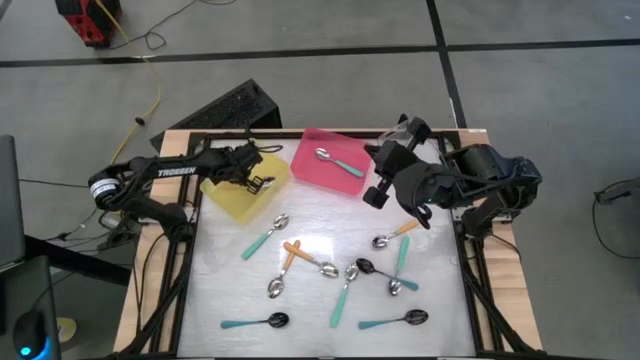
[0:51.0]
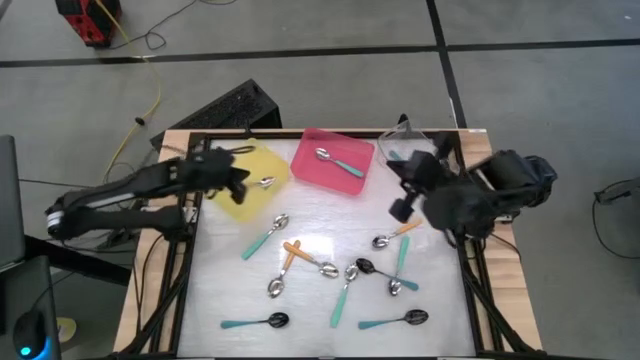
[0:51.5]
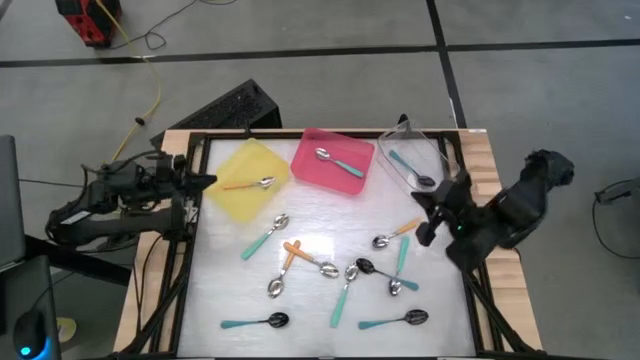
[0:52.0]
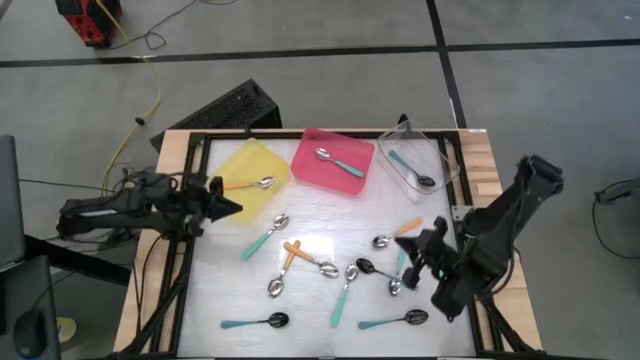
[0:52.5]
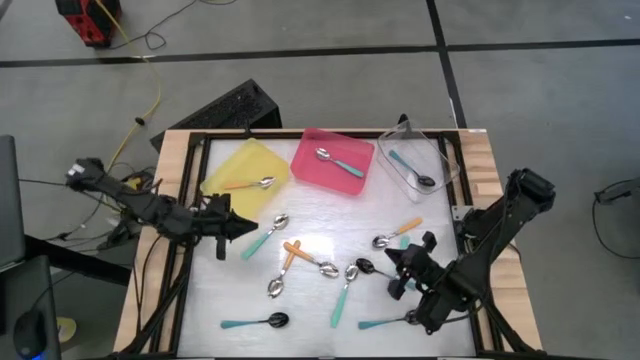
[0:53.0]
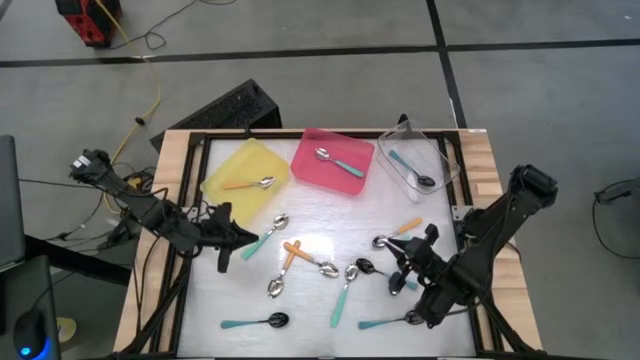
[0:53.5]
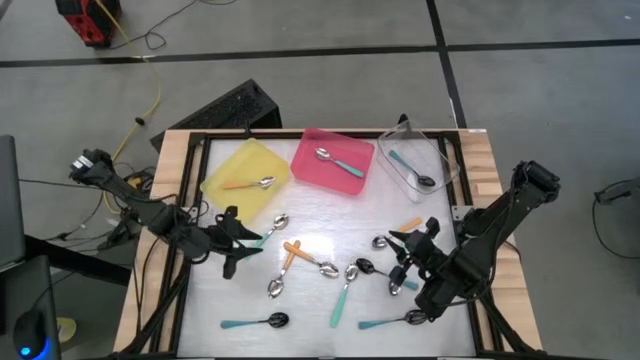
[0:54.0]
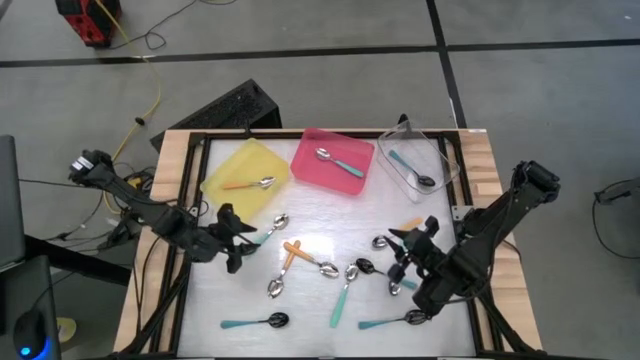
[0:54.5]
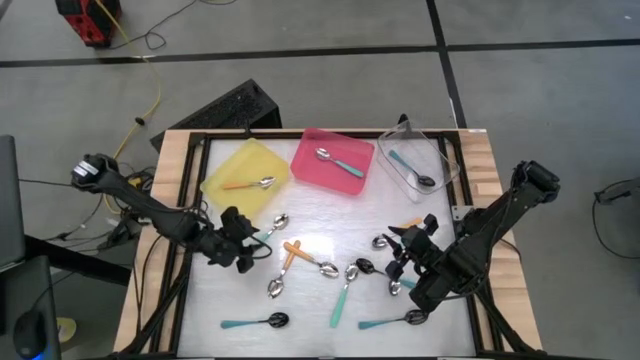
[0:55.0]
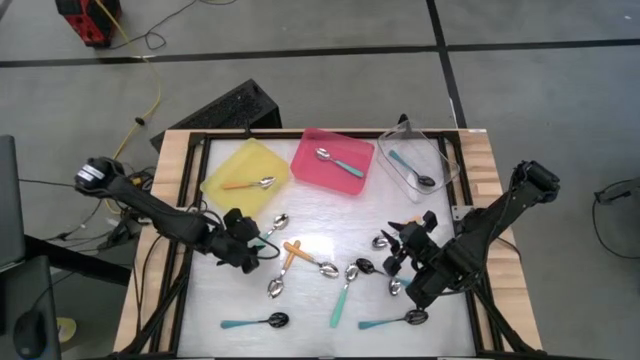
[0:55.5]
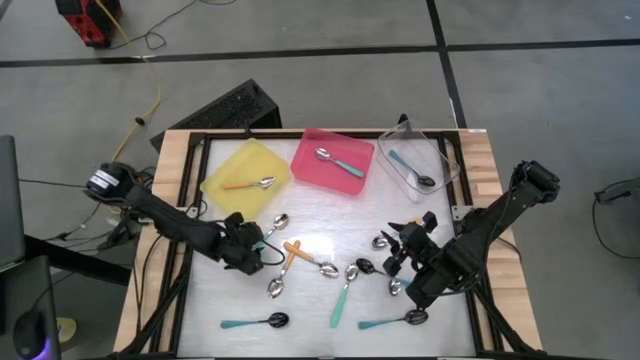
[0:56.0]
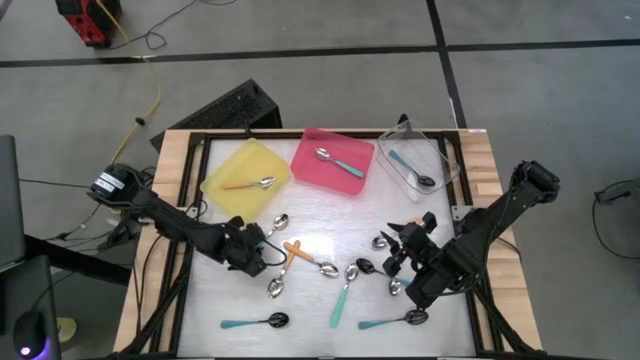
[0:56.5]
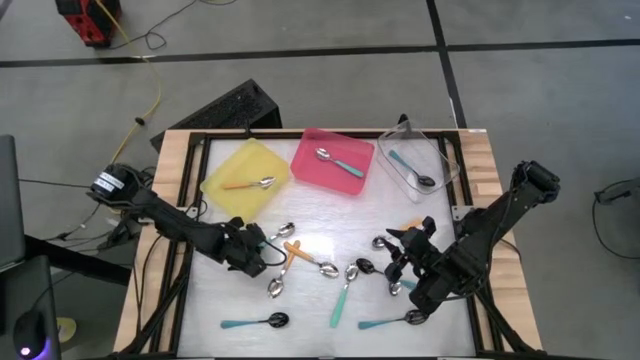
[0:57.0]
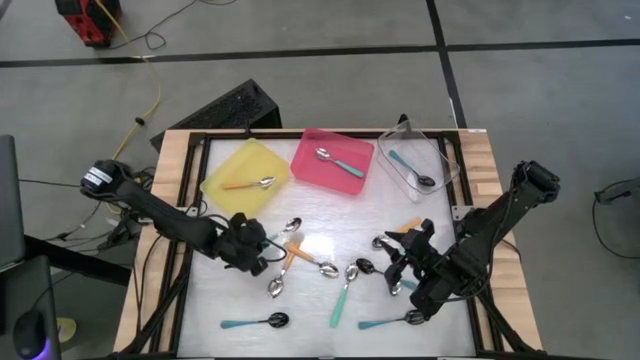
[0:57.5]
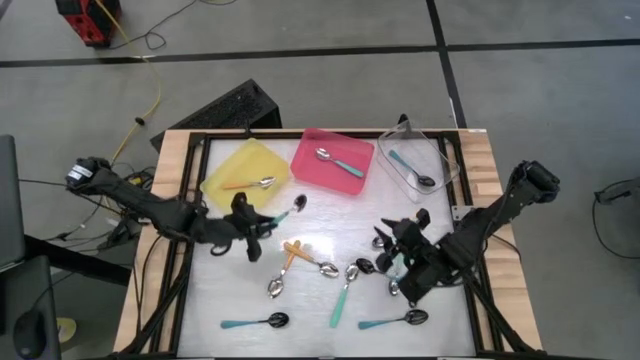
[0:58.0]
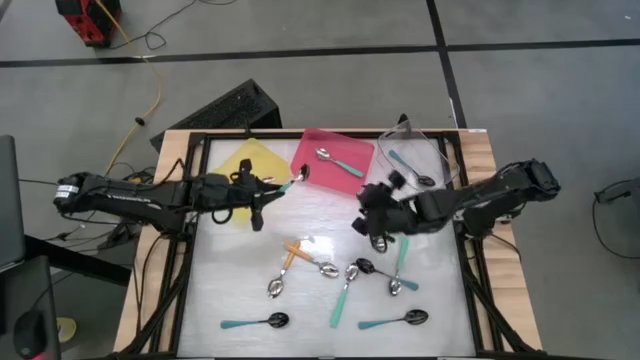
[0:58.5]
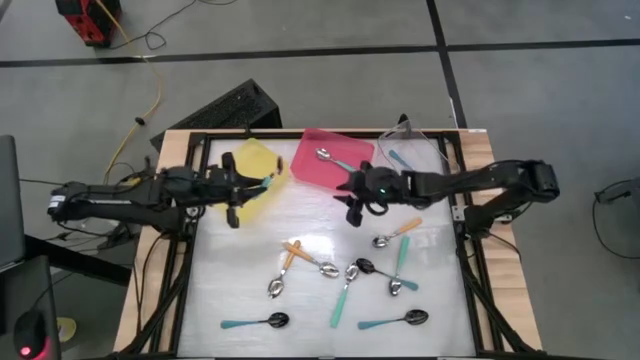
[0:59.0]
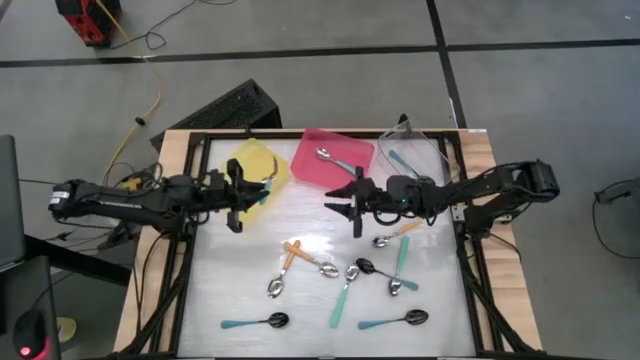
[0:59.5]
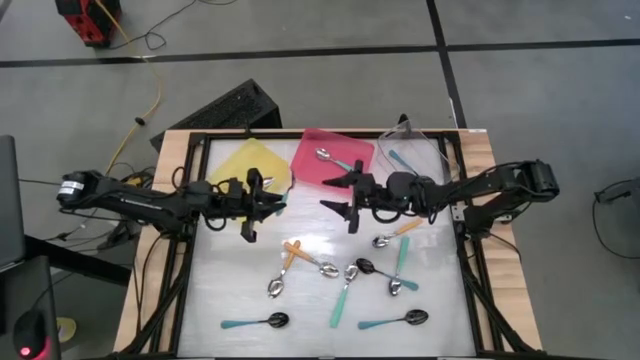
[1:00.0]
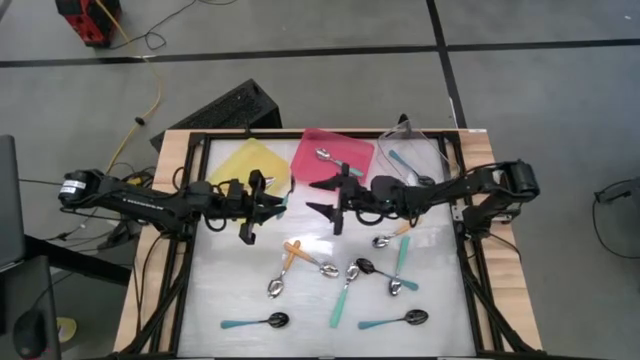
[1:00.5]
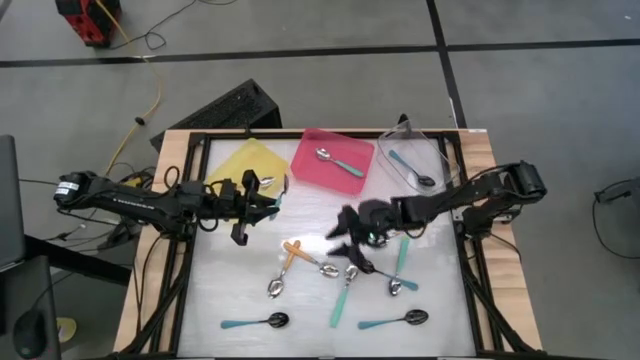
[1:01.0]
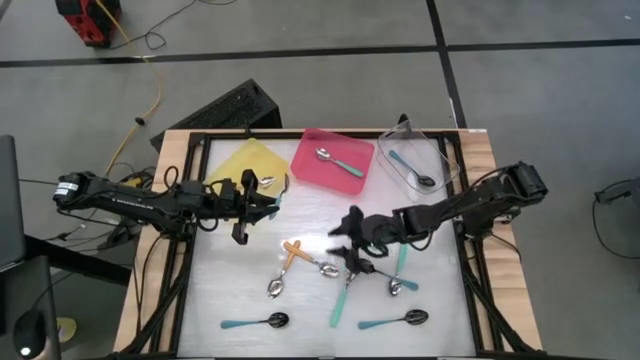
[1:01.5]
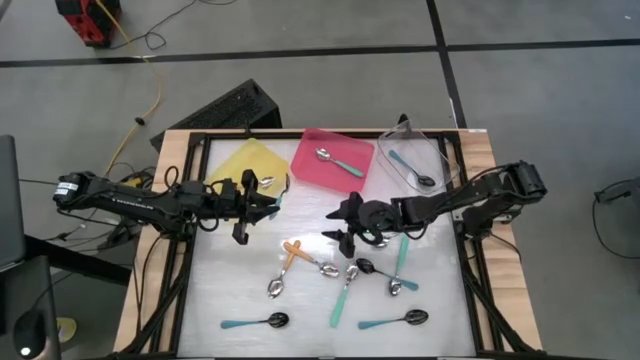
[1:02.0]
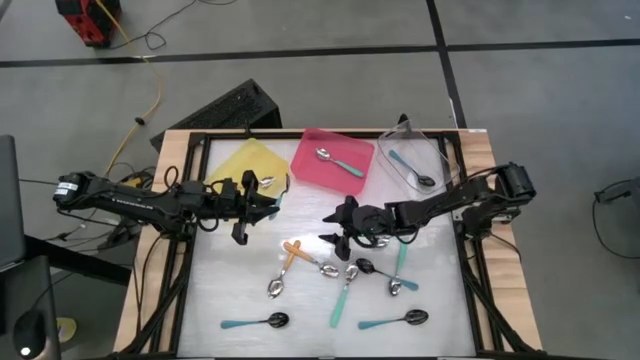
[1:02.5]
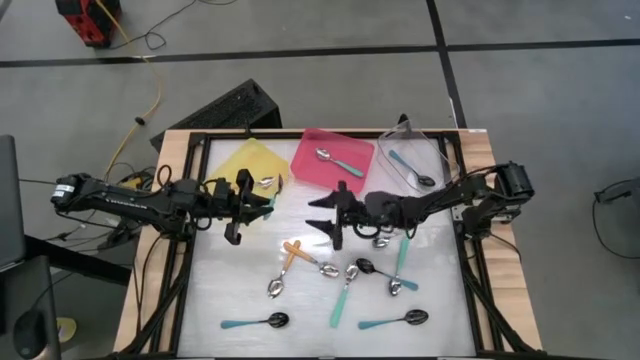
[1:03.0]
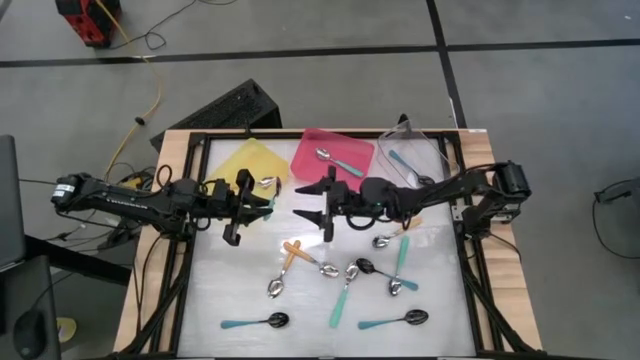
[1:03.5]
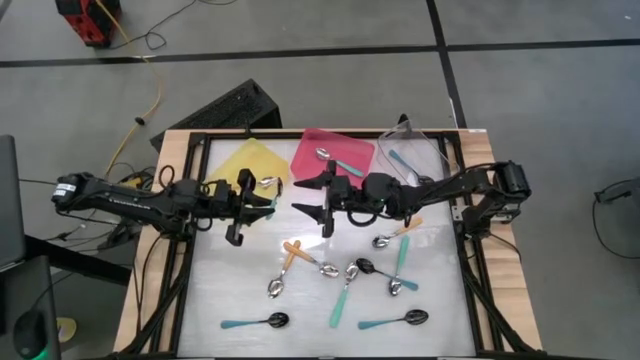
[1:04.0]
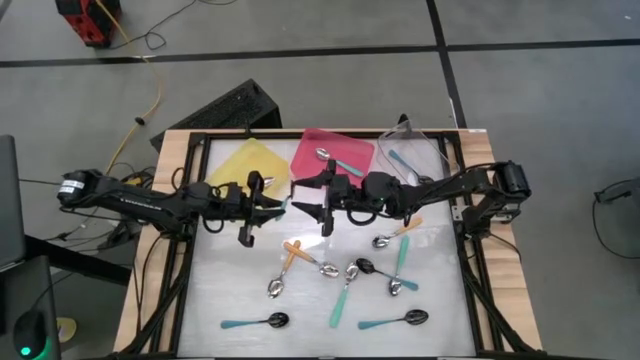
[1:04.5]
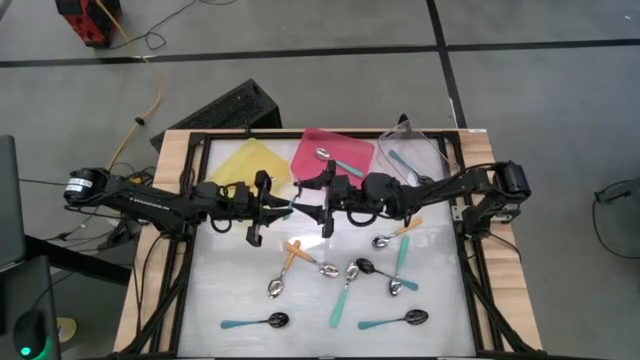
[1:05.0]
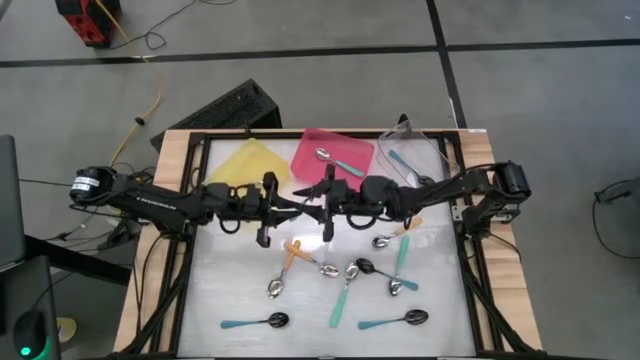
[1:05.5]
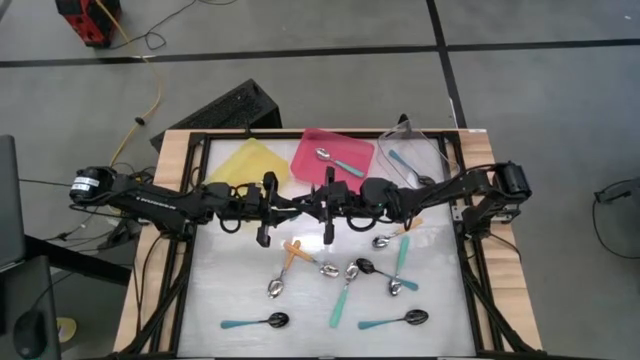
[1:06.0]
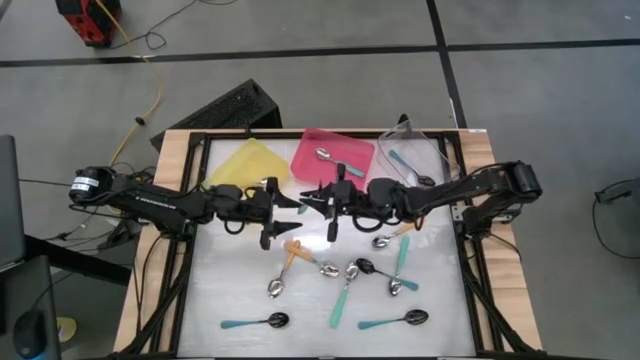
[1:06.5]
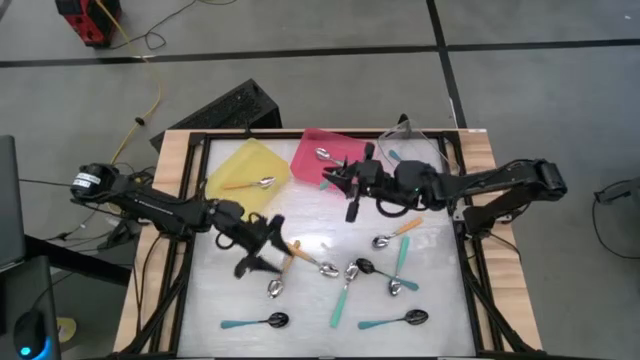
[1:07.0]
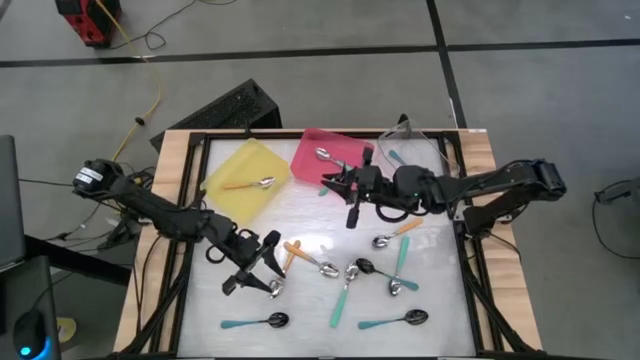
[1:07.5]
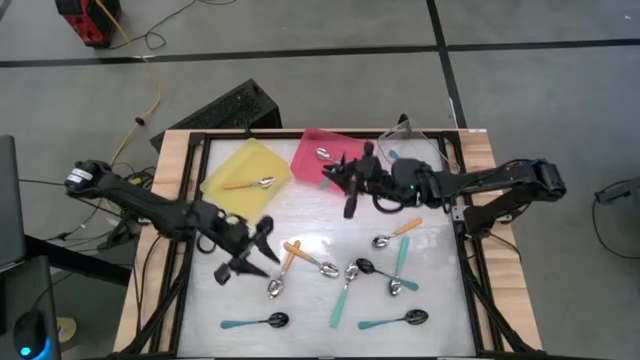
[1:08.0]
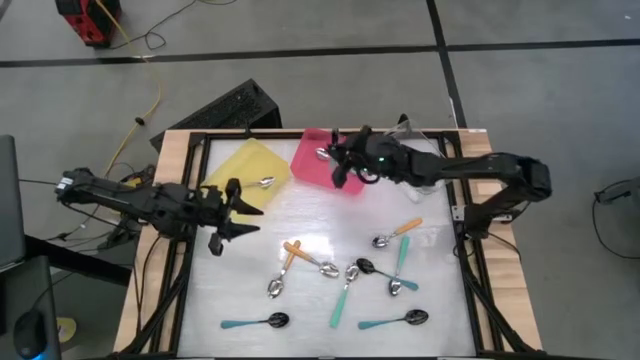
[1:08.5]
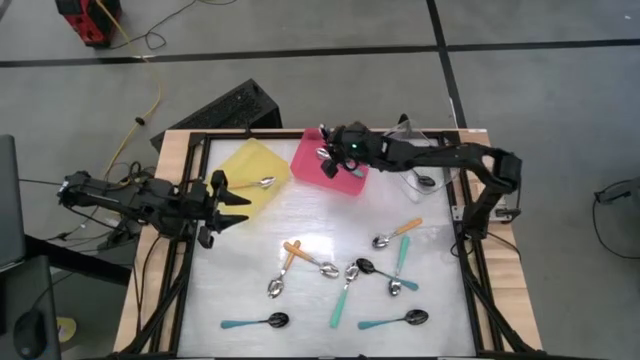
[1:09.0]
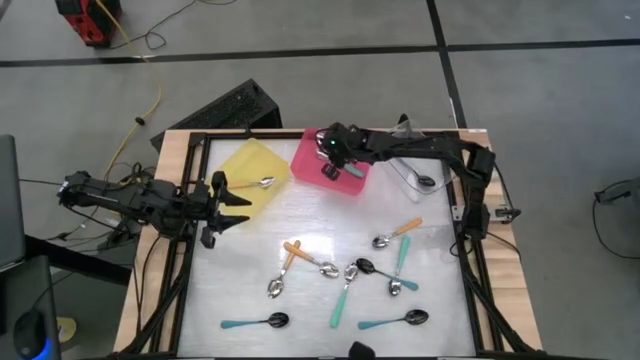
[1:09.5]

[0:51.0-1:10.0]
Task: Sort silverware by color (type)
Put the green spoon into the red bin

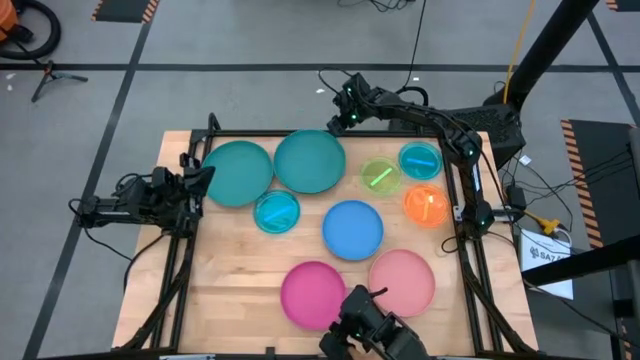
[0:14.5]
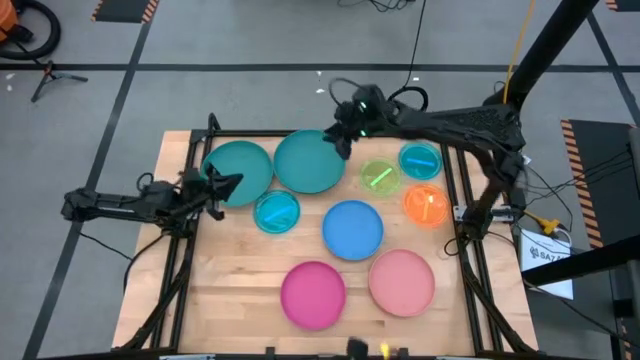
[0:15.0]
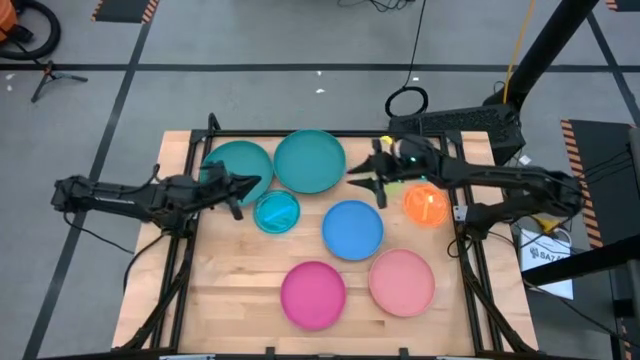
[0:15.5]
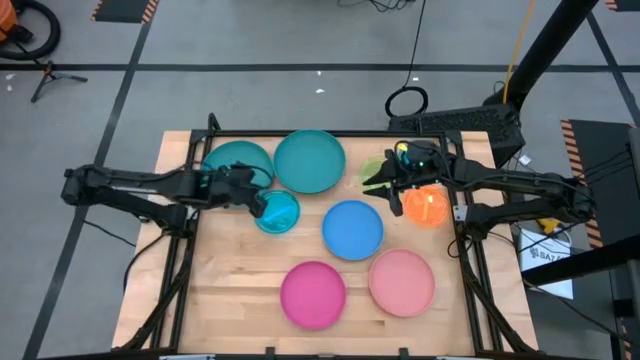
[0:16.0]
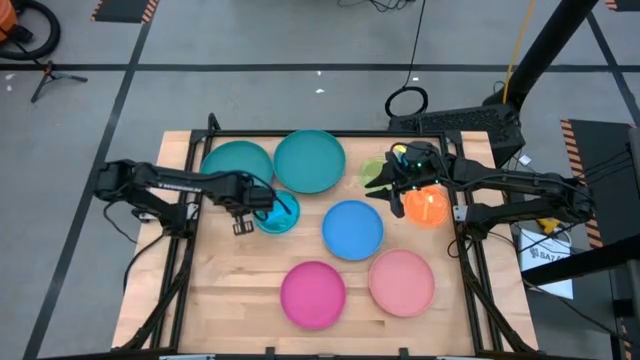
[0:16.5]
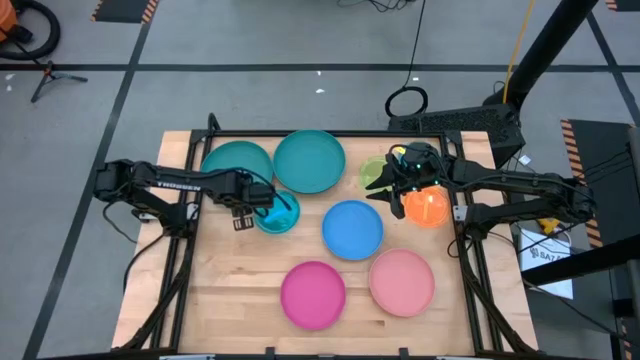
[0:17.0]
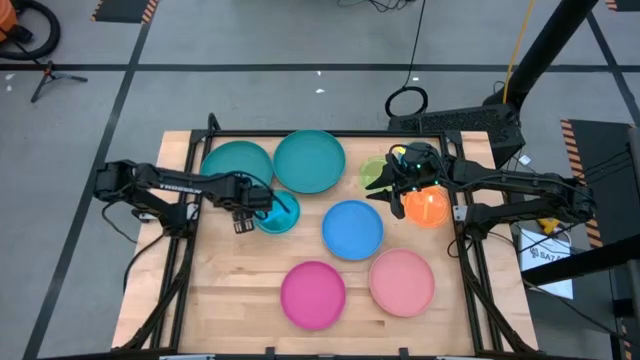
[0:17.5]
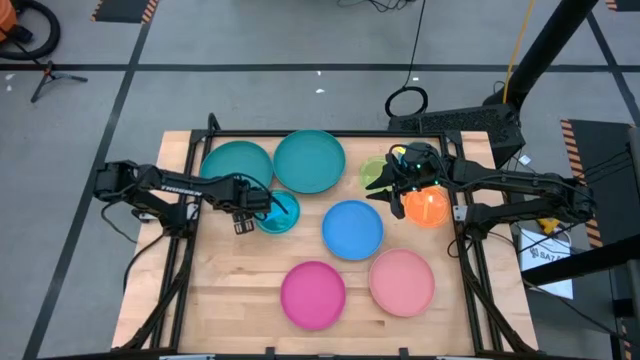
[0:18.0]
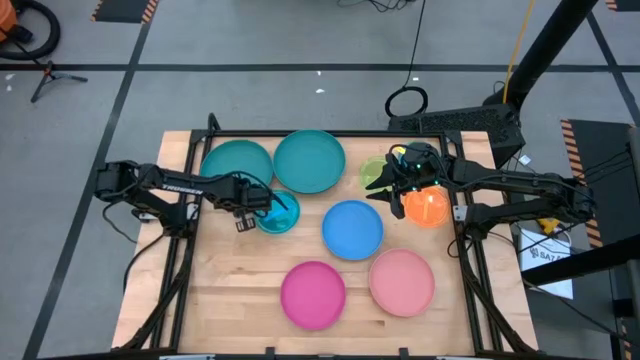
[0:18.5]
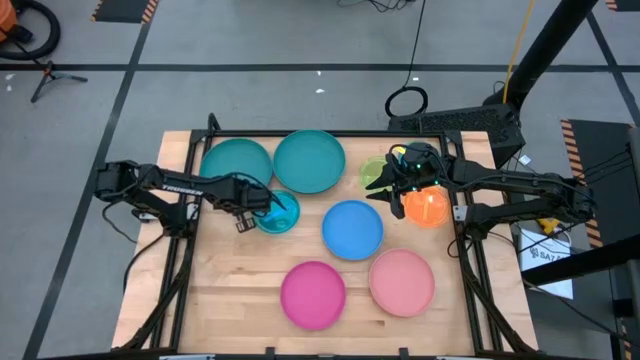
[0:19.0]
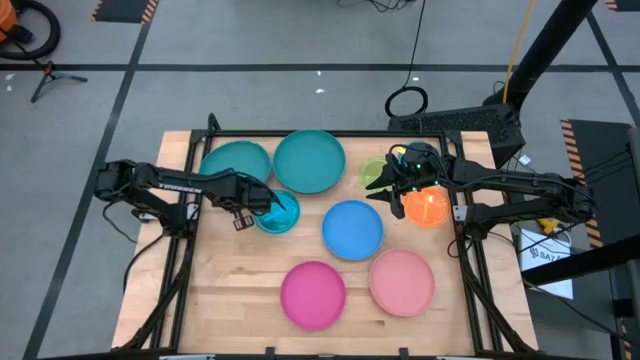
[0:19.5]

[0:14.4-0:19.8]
Task: Stack plastic plates
Stack the green plate on top of the green plate
